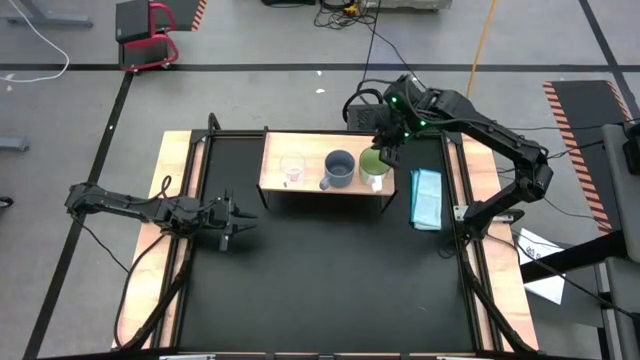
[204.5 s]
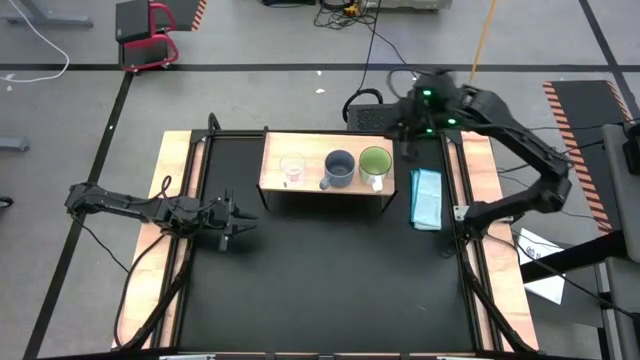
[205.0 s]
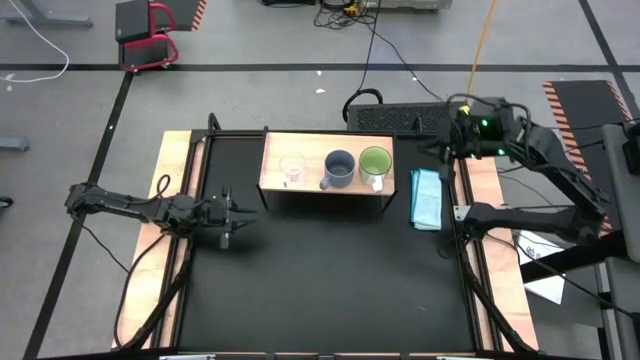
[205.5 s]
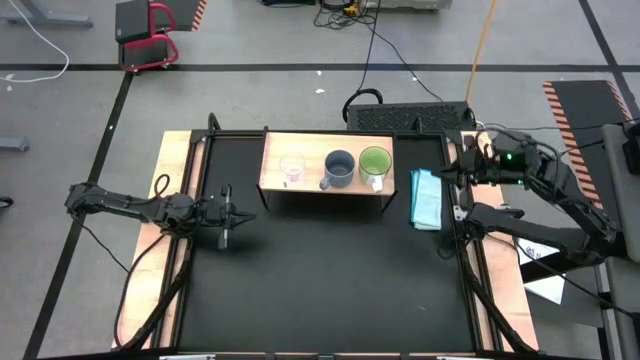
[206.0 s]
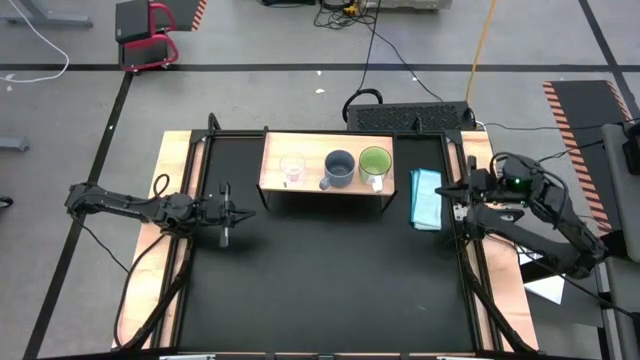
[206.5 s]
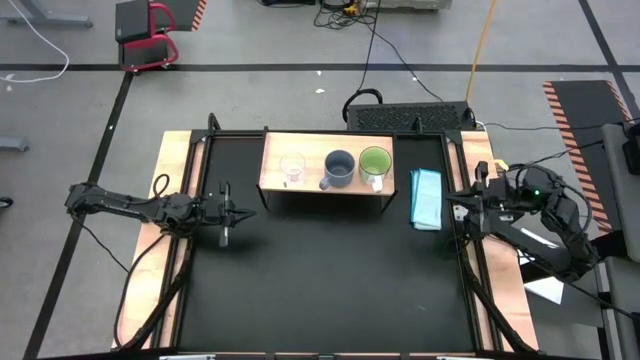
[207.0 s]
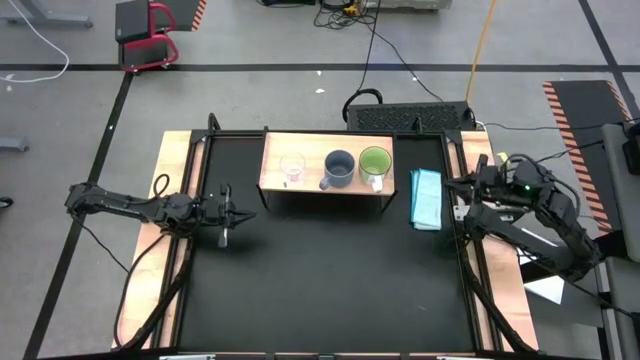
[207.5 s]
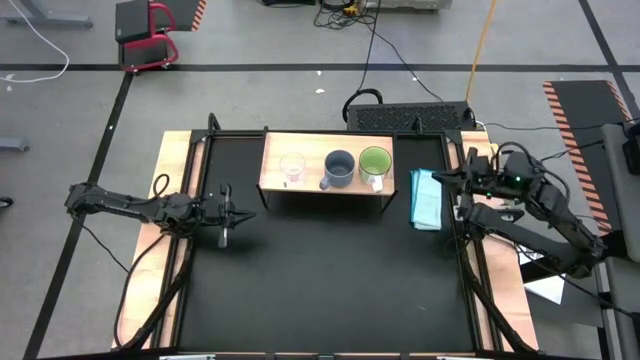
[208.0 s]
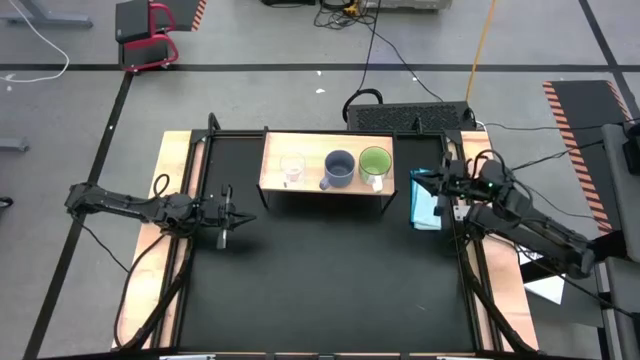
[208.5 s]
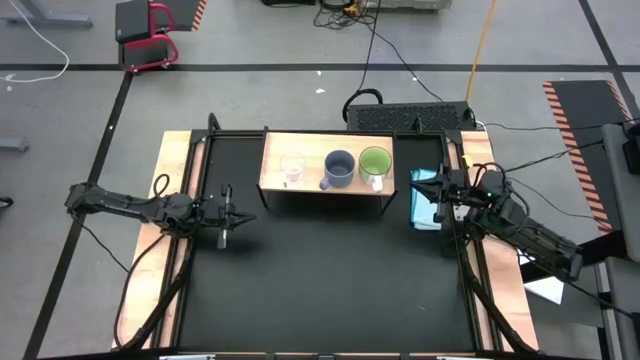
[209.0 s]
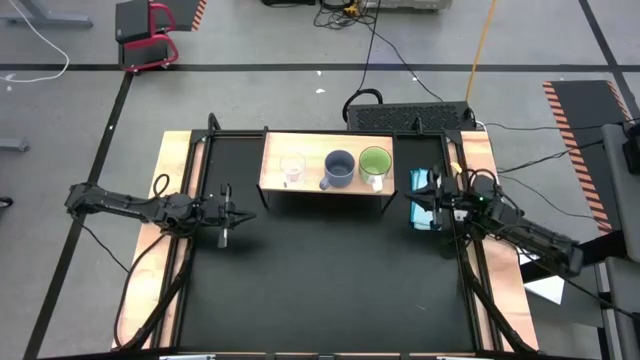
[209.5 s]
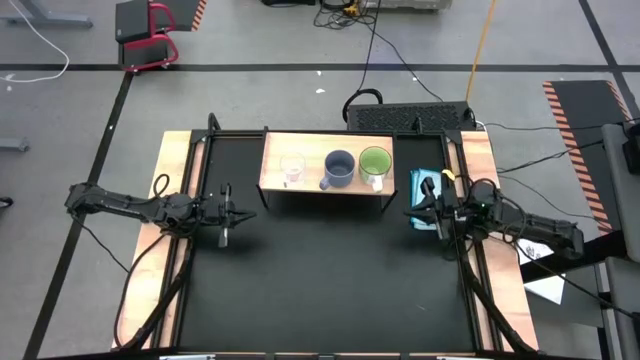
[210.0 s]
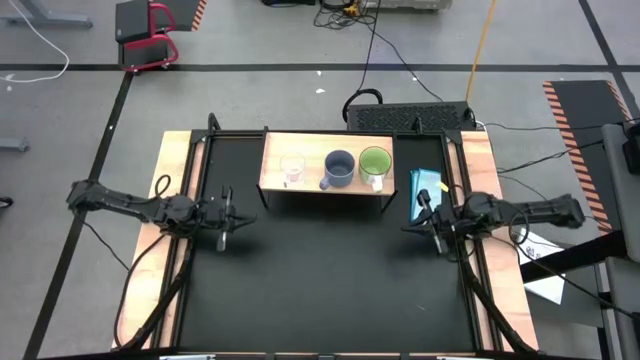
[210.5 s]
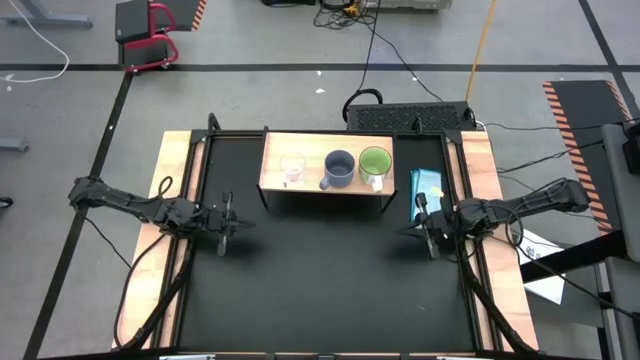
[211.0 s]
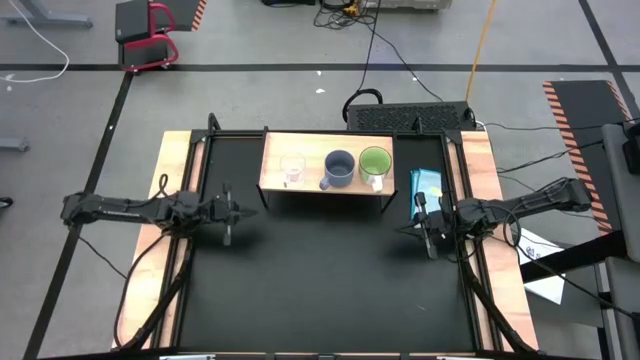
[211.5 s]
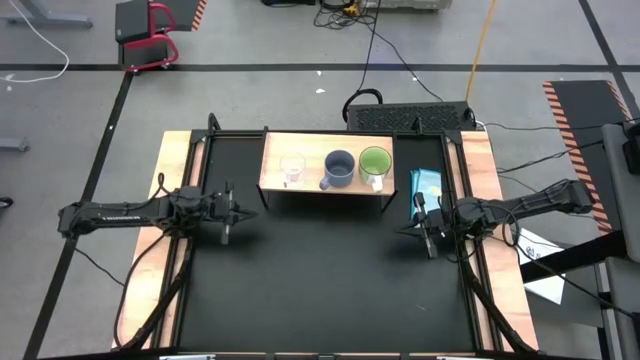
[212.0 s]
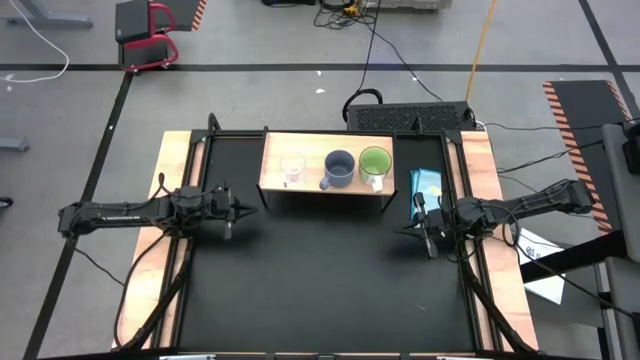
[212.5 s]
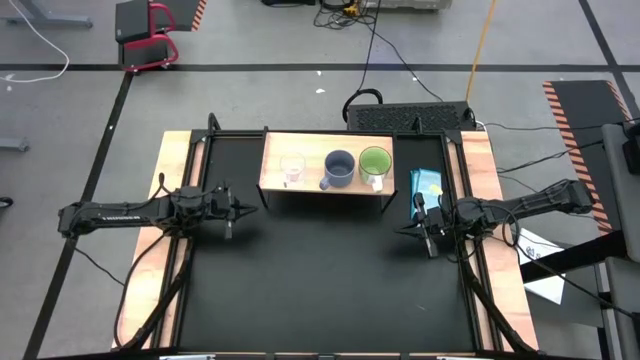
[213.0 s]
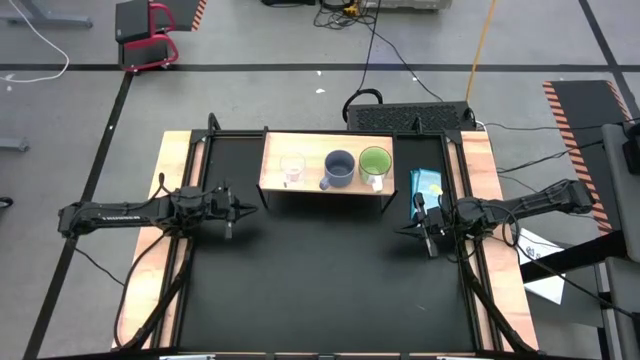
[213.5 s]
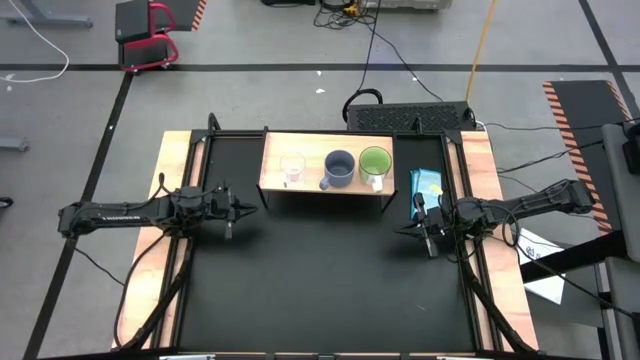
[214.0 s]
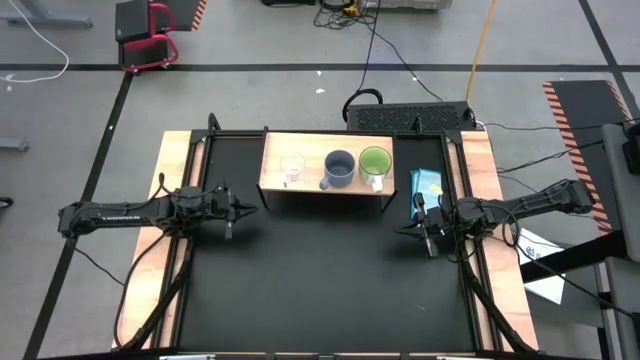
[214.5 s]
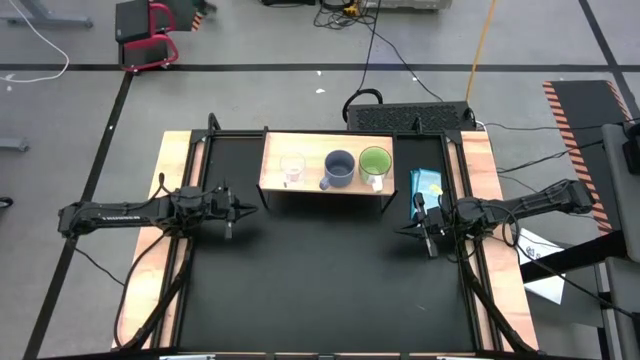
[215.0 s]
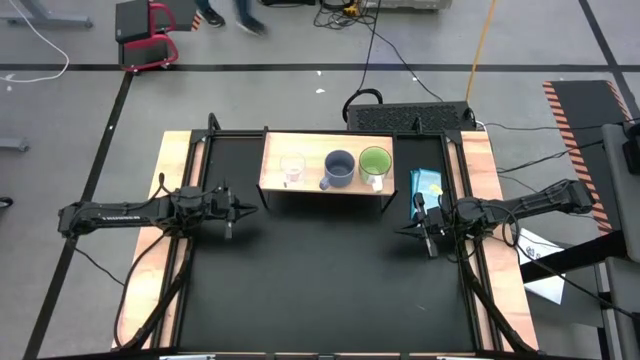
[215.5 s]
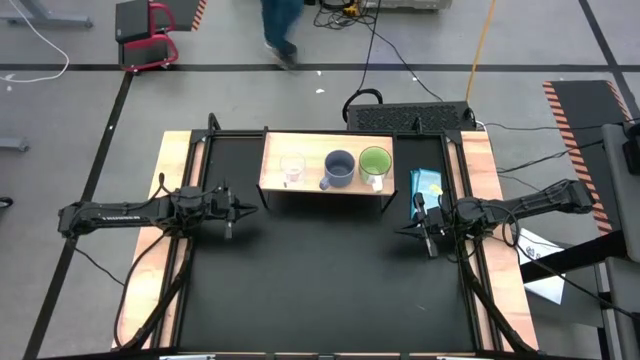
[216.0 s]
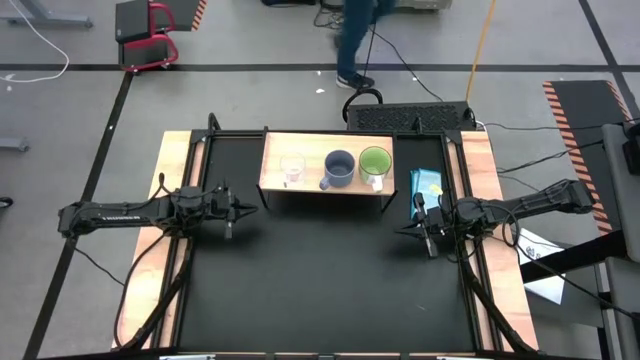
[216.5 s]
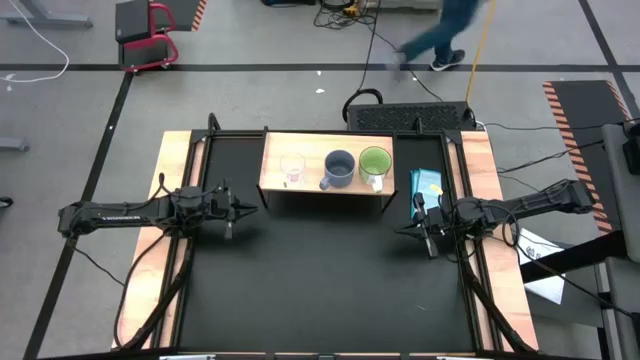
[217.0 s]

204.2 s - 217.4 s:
Task: Stack small to large cups/mugs on shelf
Return to Home Position

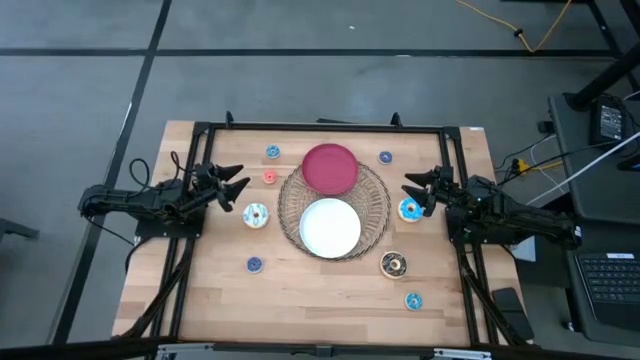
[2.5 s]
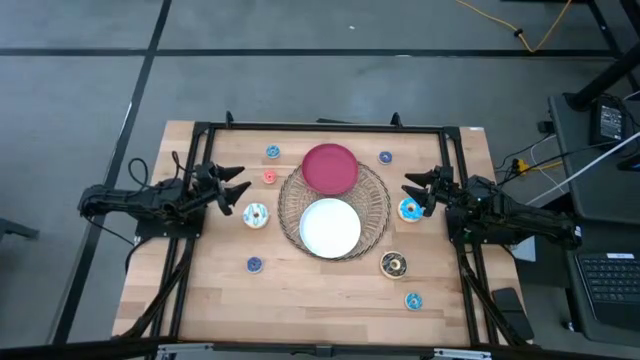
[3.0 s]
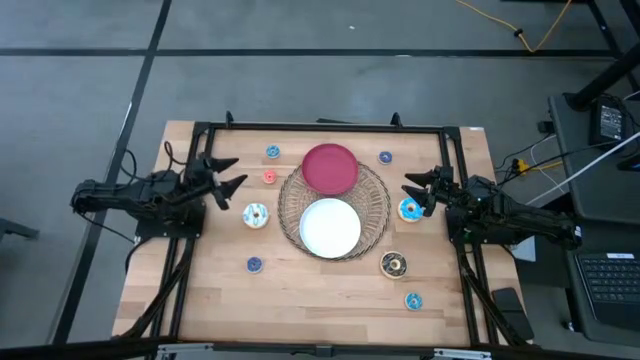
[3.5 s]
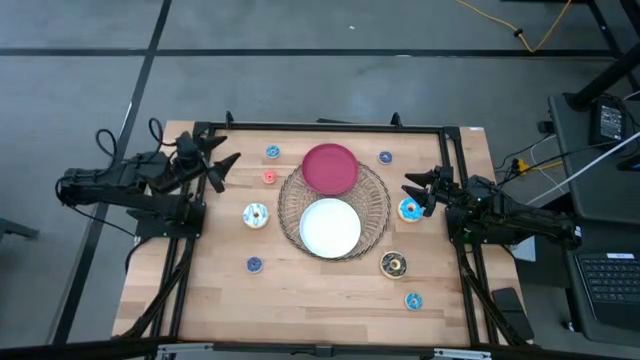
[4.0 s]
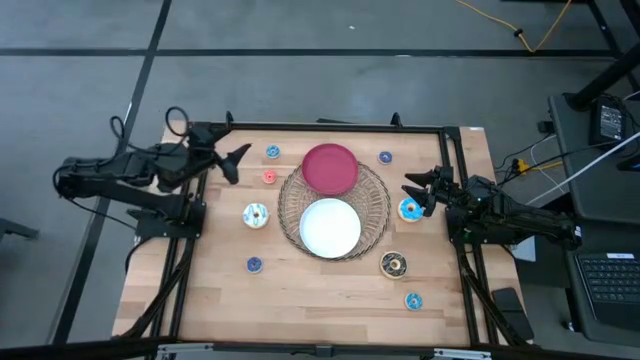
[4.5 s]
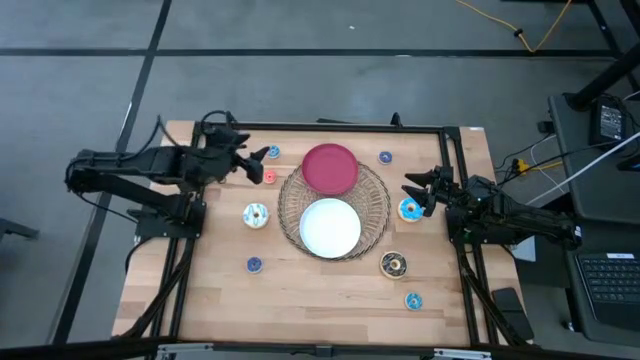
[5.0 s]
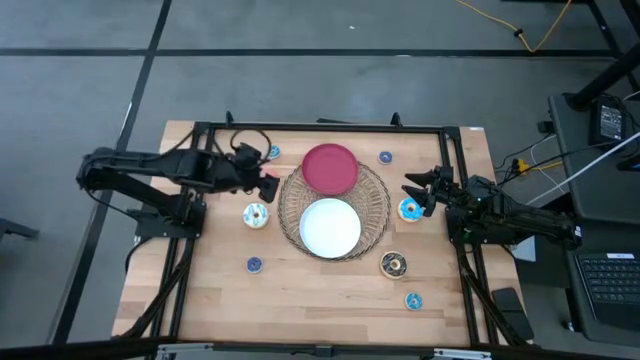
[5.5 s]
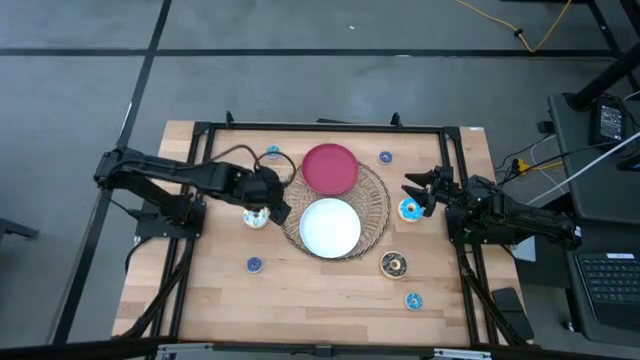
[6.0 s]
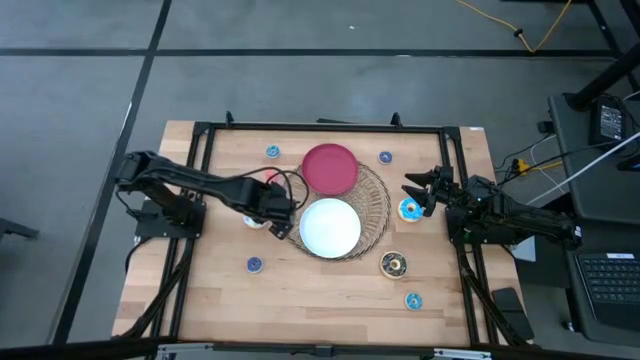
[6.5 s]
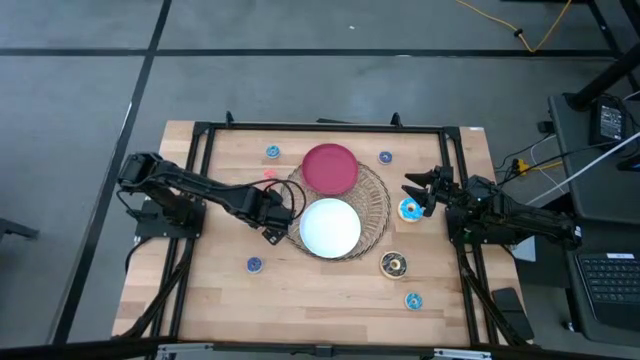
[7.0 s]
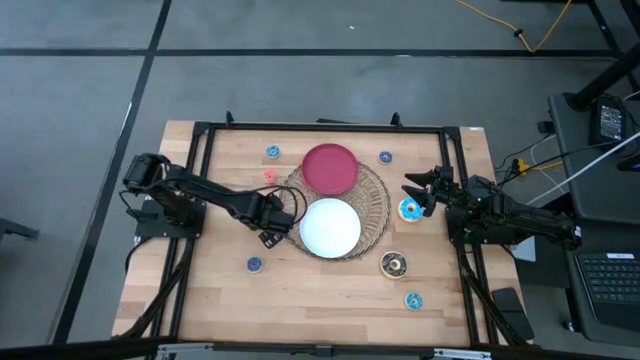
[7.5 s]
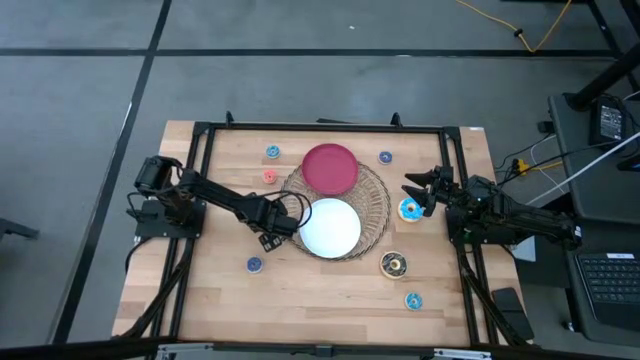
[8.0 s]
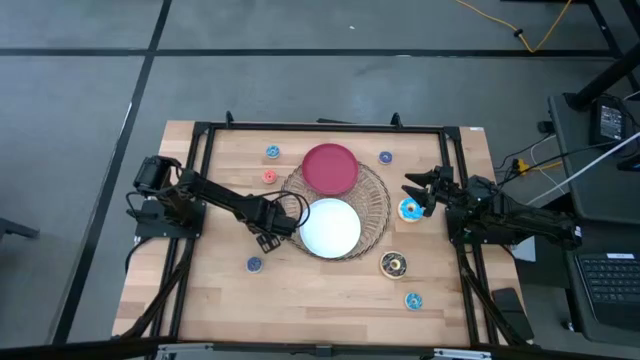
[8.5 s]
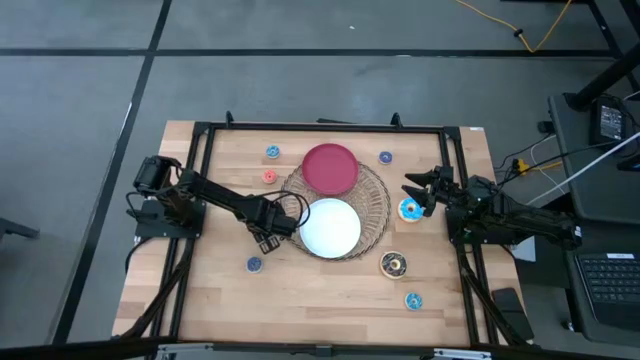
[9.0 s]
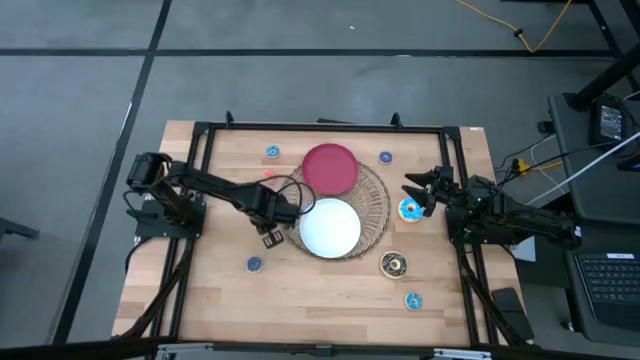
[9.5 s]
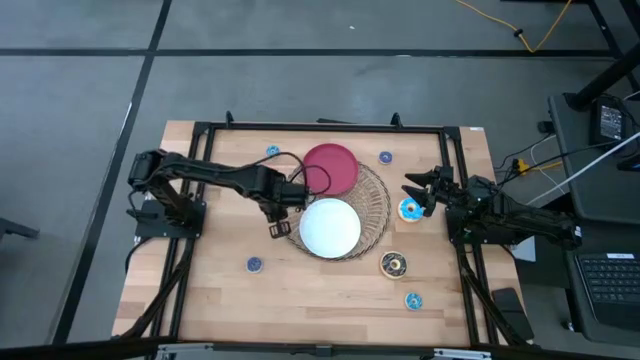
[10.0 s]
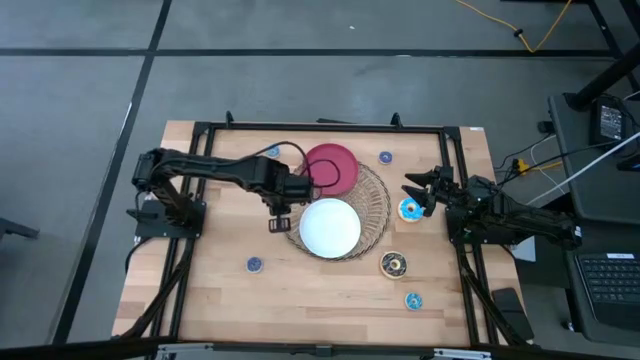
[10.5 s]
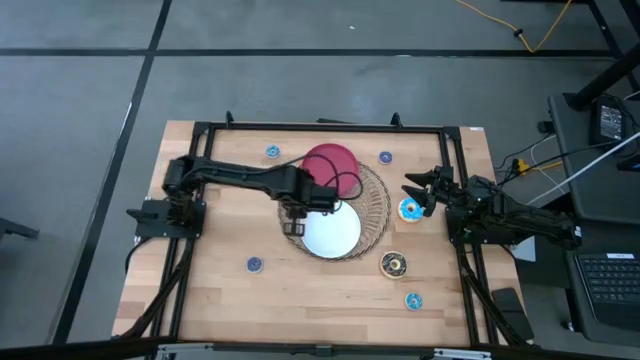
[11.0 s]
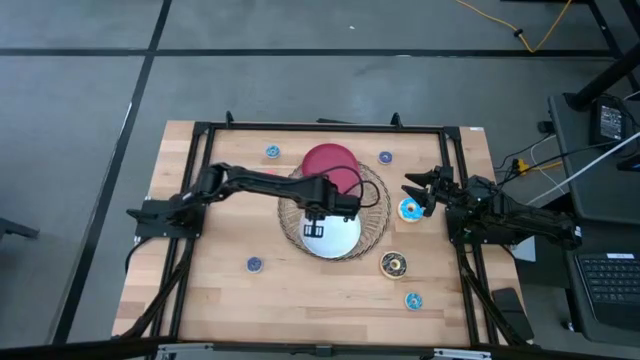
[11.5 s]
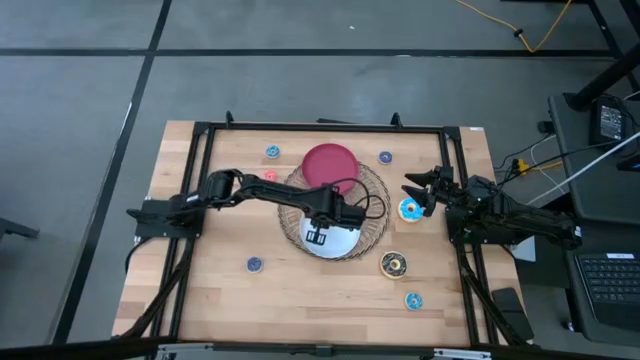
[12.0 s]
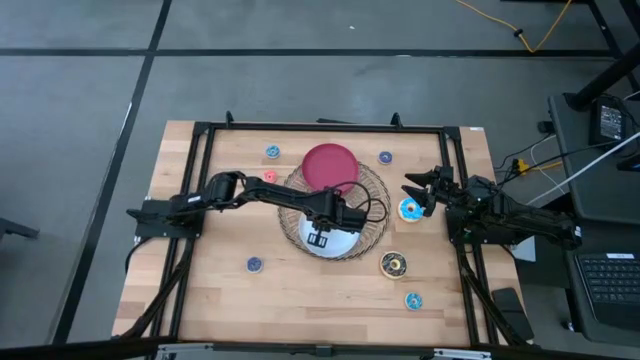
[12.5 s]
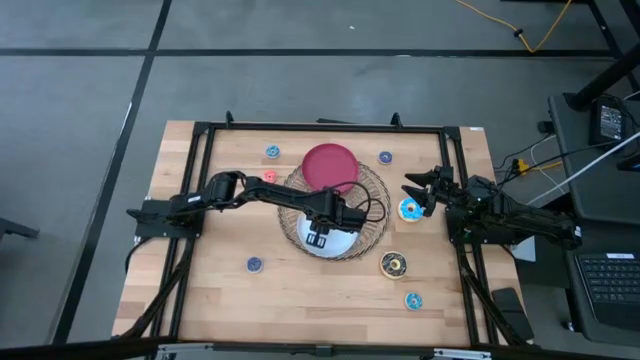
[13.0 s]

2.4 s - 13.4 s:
Task: Pick & Place donuts
Put the large white donut on the white plate
